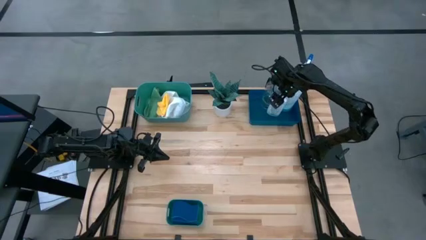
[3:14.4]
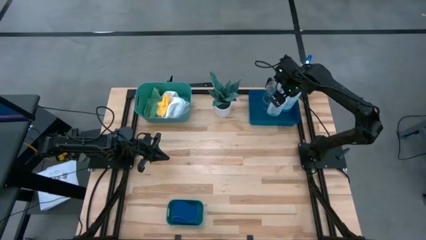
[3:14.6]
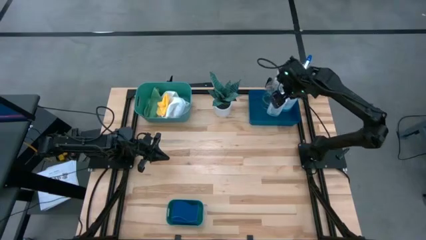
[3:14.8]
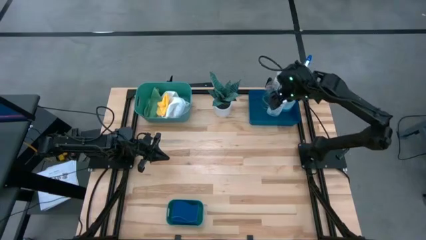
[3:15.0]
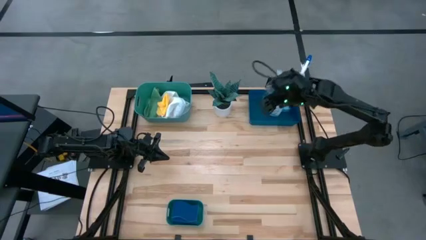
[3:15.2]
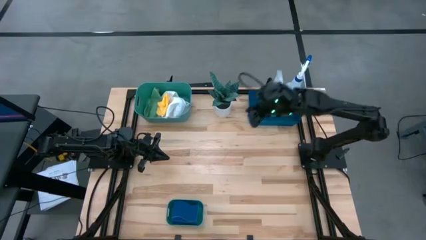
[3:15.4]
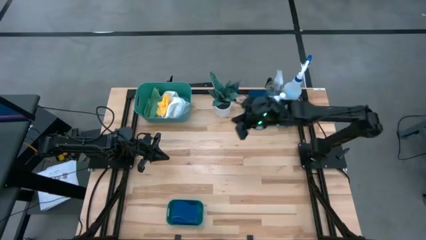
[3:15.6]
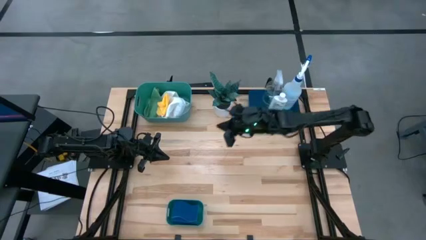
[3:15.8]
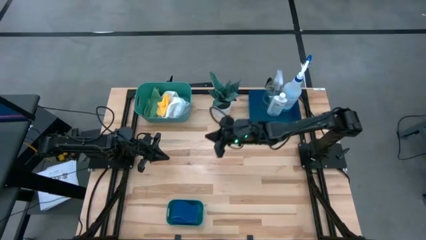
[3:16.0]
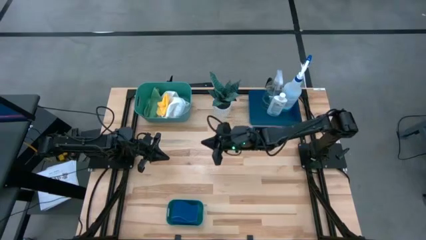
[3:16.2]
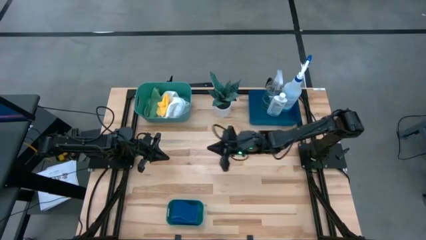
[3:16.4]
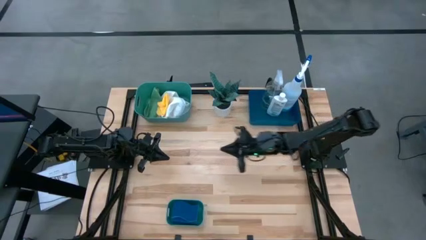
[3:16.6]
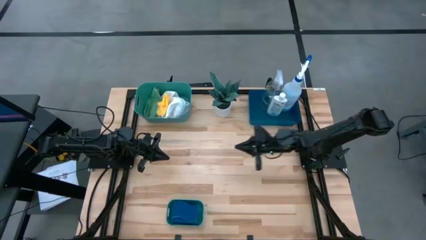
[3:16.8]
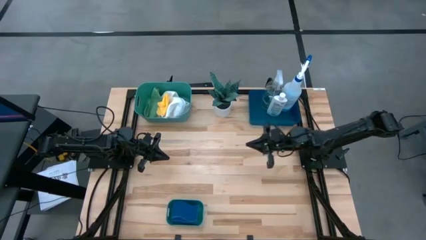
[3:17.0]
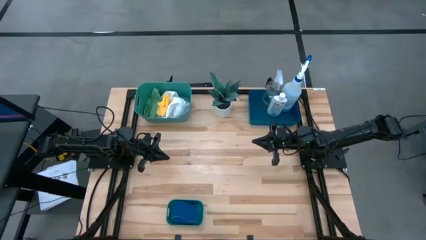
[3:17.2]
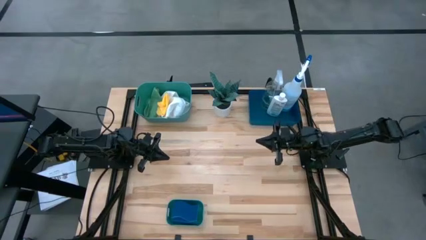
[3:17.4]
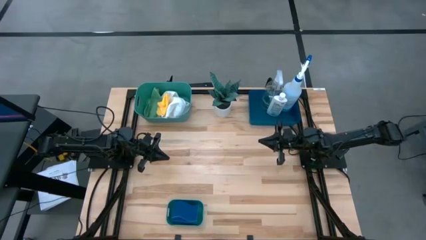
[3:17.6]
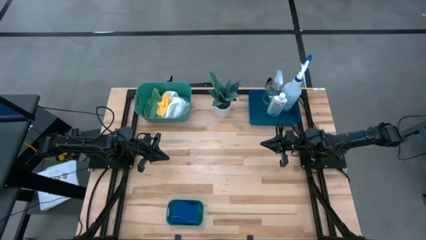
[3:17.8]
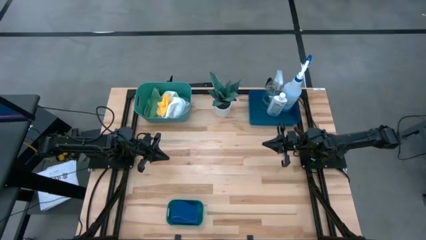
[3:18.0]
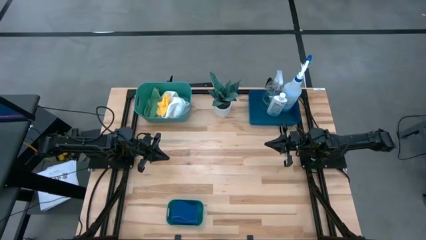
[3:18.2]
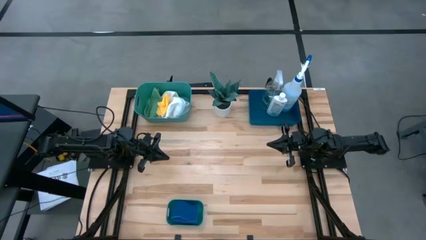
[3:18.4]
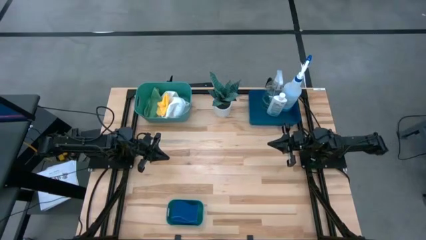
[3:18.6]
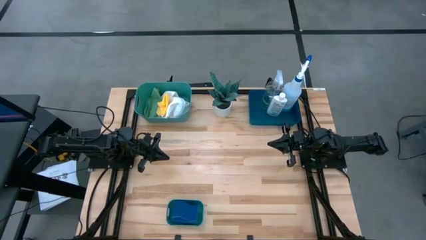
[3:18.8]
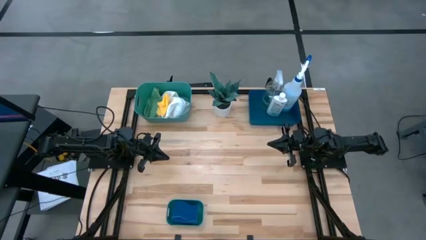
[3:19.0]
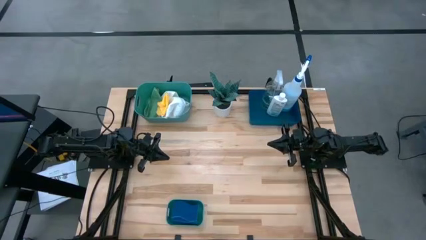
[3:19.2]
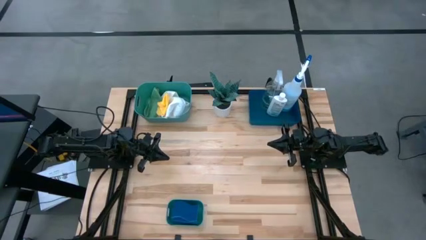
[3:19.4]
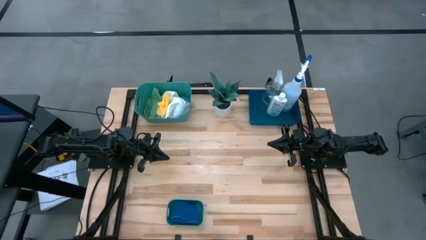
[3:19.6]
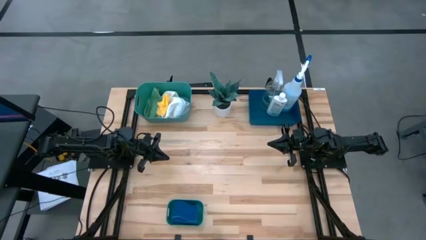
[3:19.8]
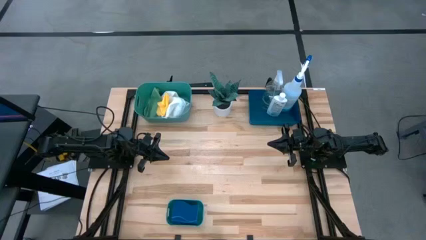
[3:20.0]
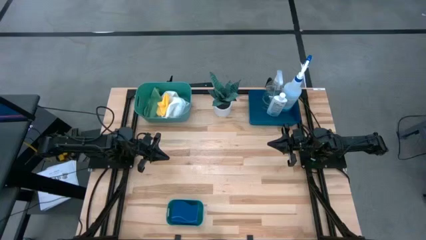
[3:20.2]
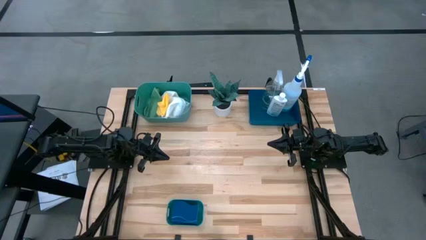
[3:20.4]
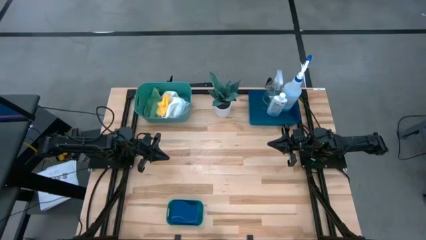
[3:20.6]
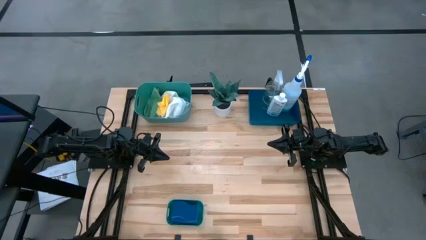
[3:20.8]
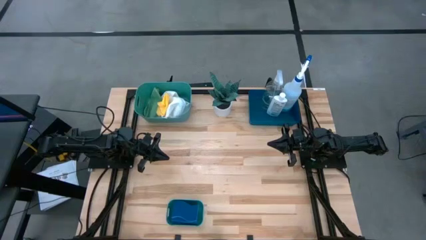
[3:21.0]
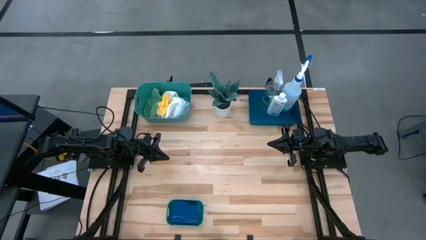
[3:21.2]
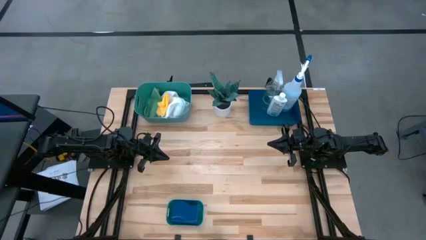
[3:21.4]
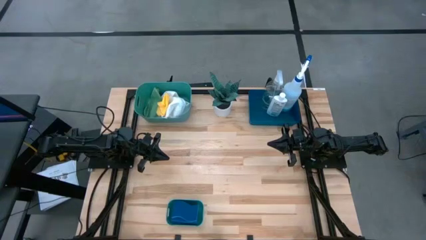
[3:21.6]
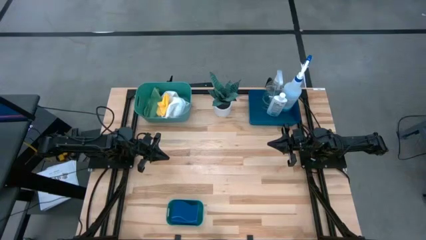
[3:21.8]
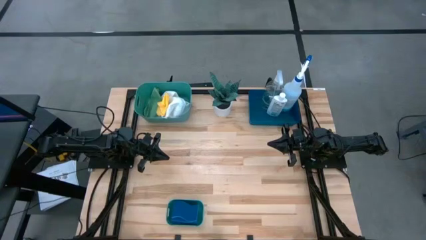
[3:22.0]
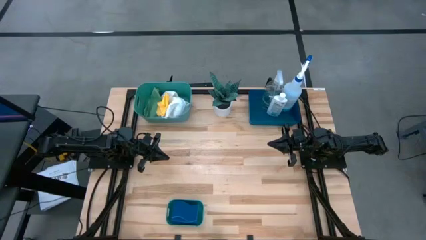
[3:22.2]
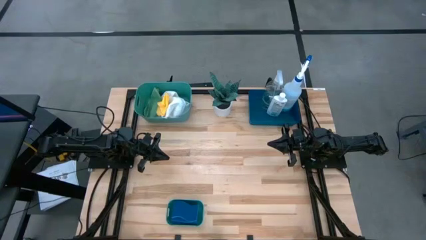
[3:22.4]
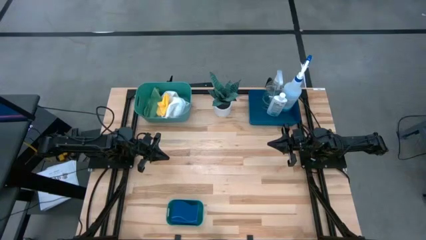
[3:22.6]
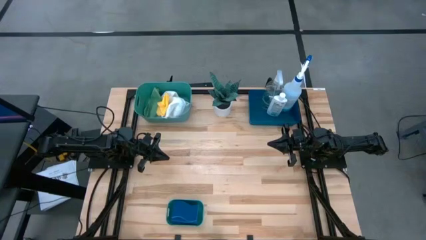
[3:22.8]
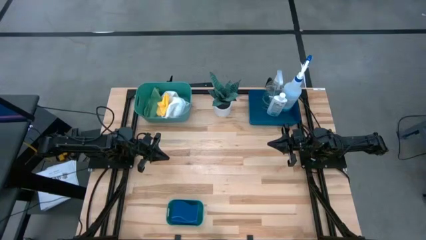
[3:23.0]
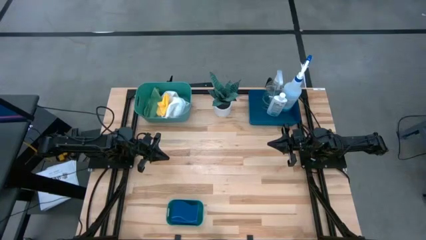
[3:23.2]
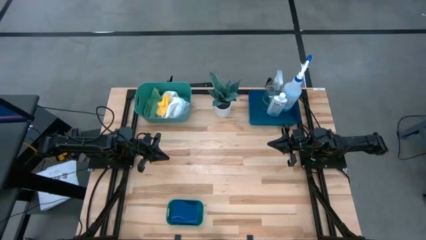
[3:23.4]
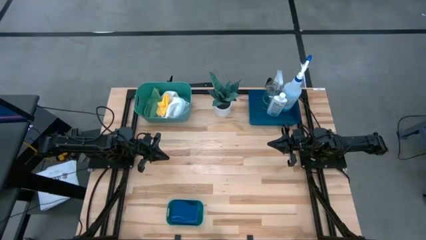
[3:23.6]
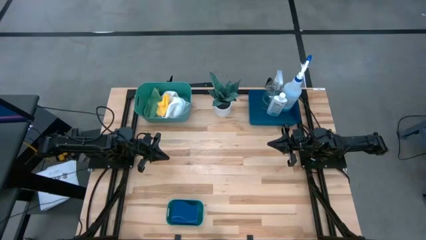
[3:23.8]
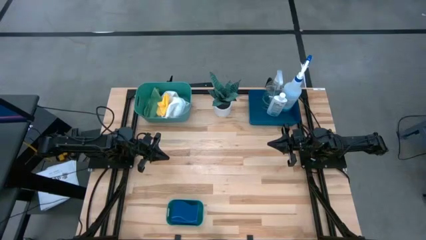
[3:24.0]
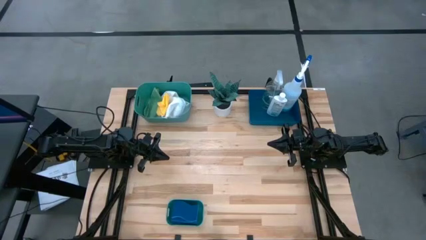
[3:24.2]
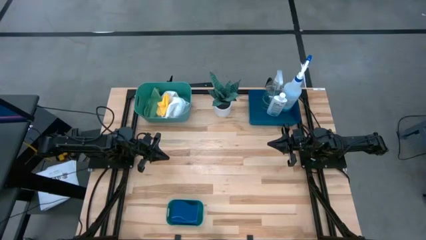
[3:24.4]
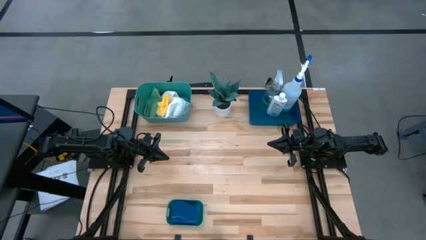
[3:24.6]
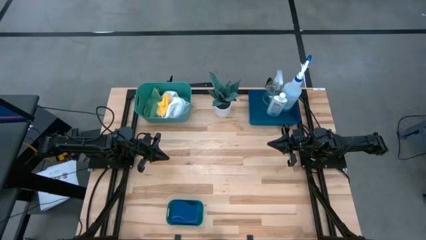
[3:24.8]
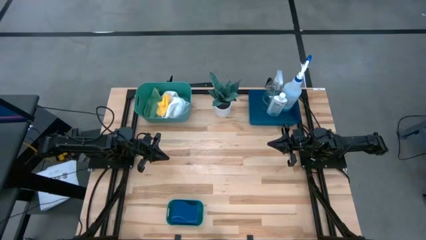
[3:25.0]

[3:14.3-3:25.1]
Task: Pick & Place Kitchen Items
Return to Home Position

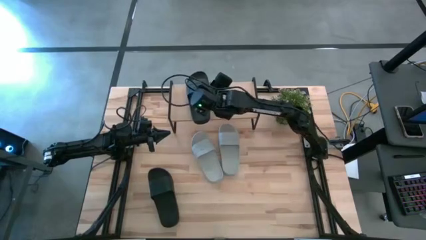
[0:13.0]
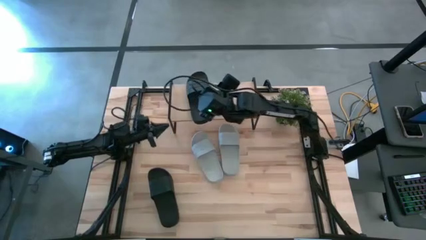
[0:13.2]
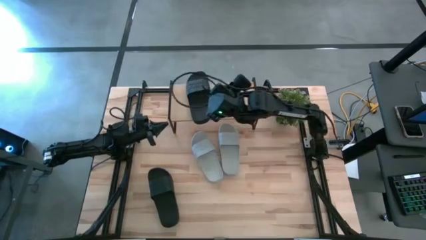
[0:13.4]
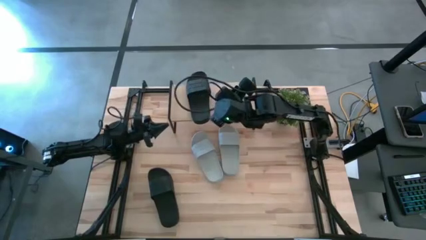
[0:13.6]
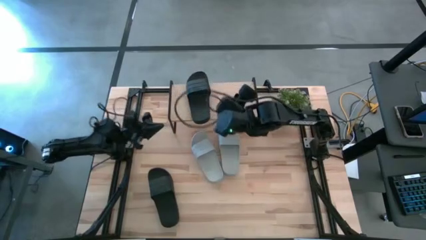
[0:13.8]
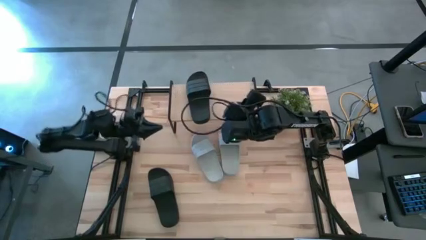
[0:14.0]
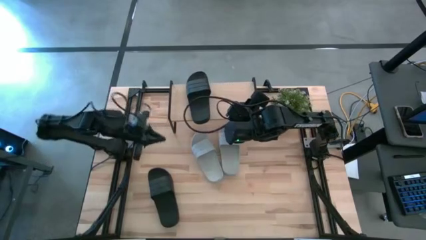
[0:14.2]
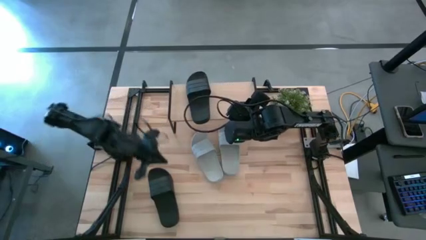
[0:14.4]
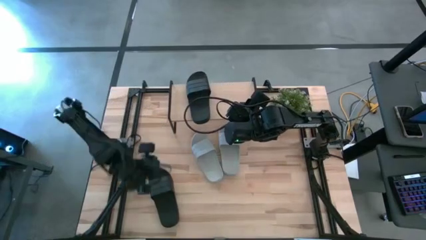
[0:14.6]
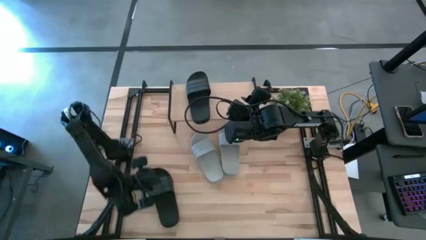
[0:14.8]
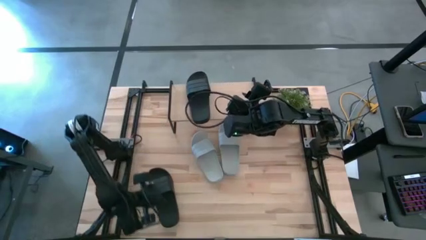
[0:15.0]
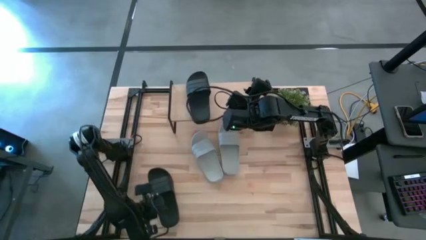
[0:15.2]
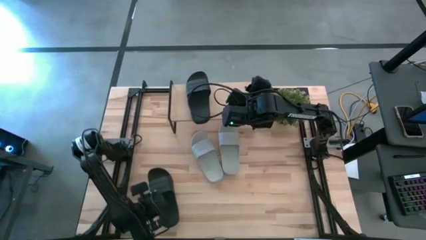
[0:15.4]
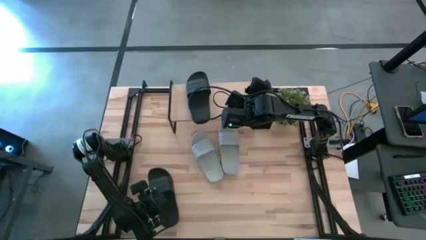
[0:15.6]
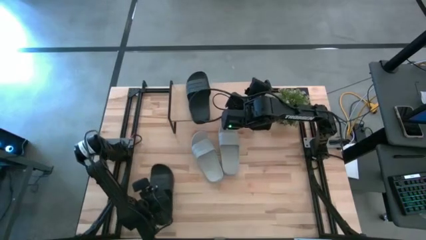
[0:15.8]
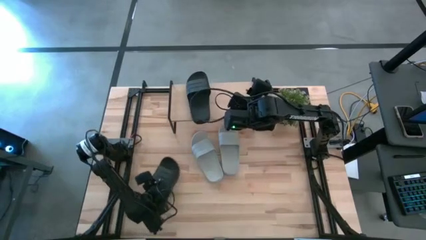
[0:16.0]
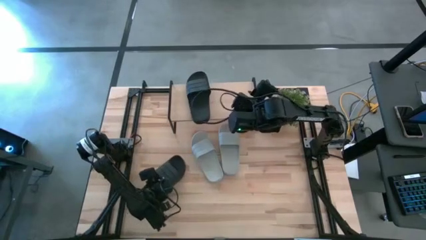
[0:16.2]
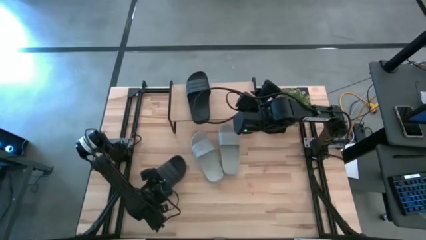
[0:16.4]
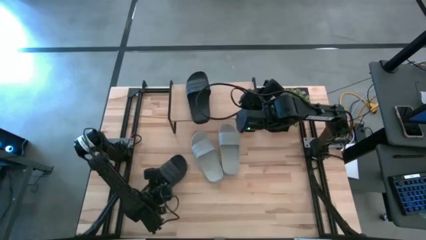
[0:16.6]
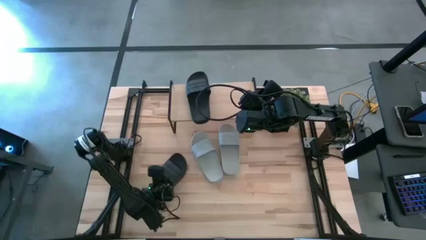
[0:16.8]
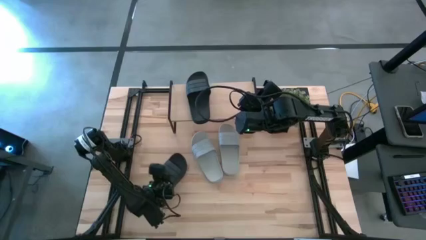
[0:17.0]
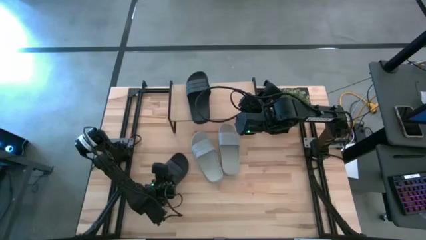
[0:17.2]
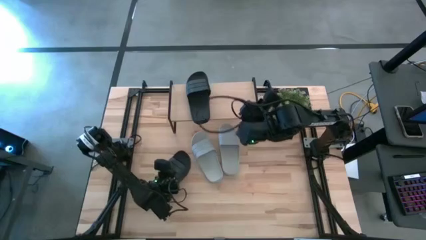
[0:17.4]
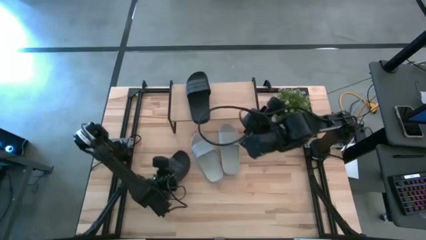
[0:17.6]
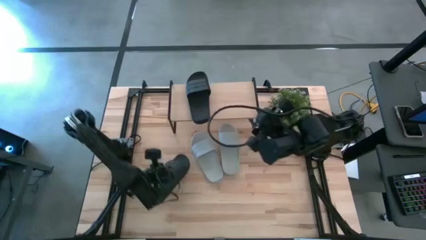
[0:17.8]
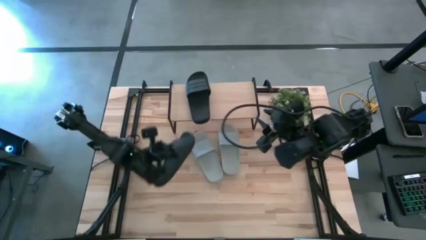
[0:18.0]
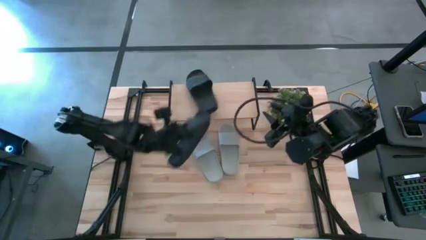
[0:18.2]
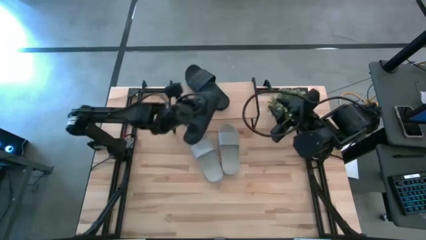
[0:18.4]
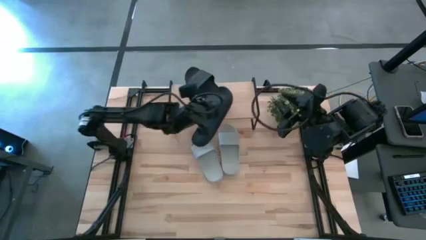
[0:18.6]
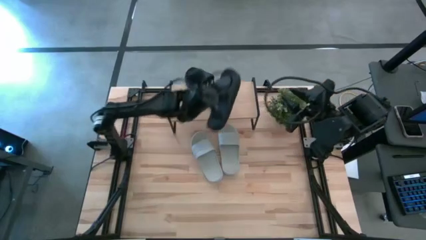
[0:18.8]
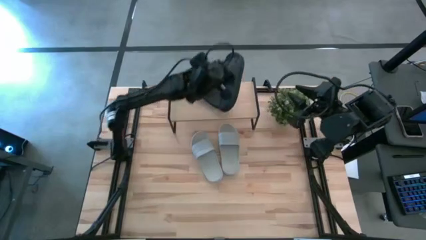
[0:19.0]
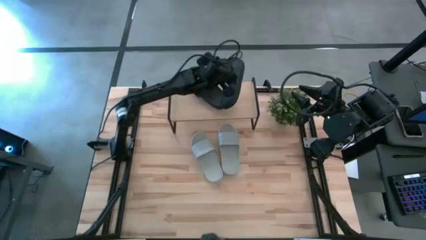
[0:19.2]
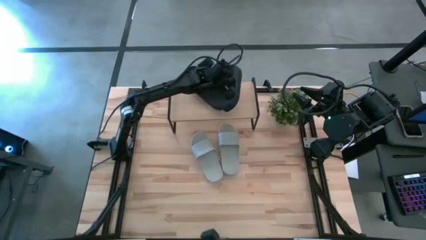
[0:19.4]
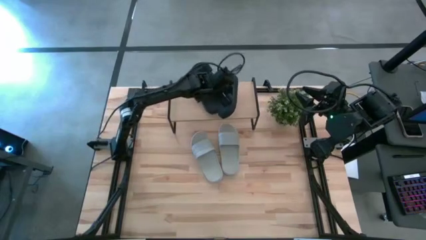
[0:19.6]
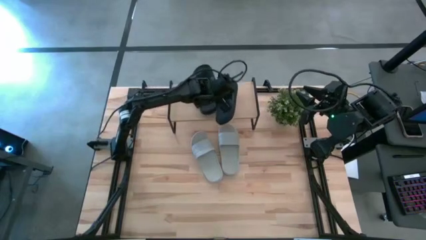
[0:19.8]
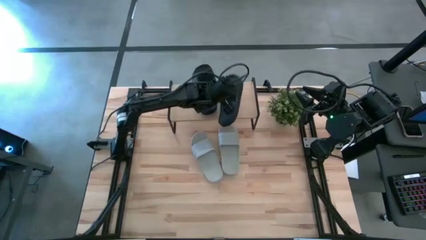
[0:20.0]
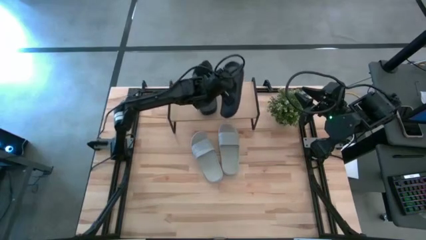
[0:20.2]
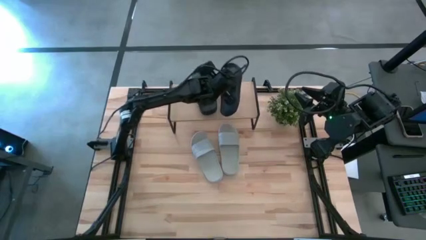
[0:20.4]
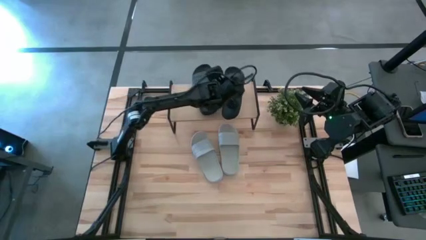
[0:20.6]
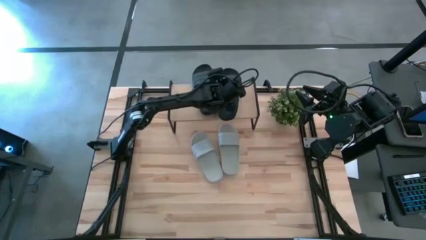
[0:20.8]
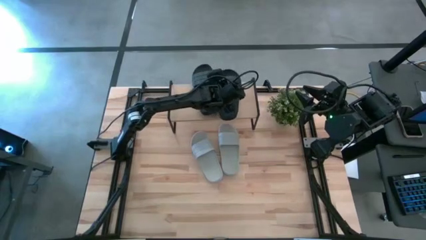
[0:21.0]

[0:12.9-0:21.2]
Task: Pick and place slides into the shelf
Put the black slipper on the shelf
